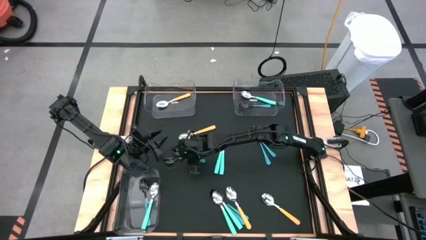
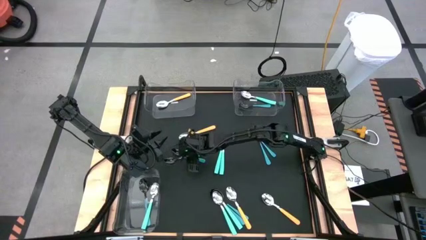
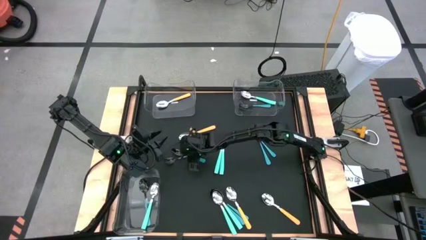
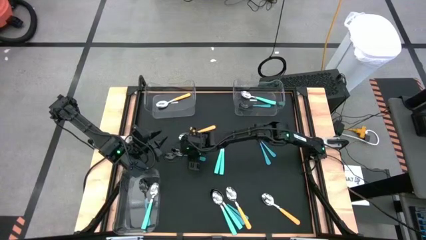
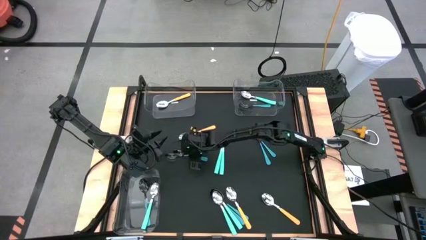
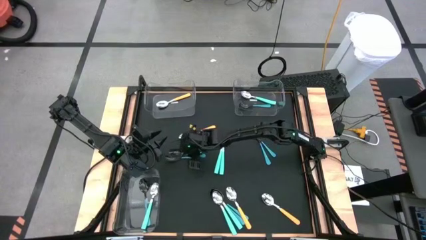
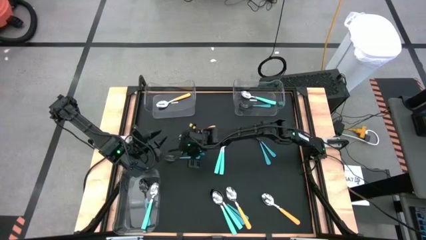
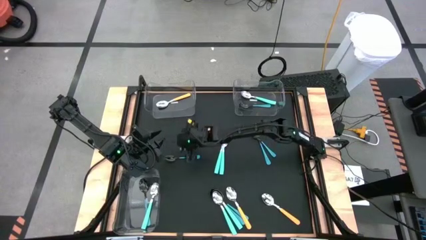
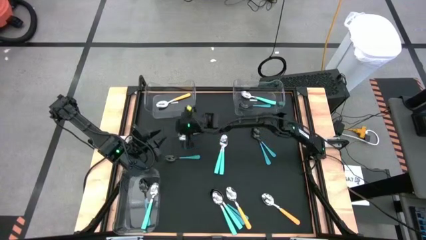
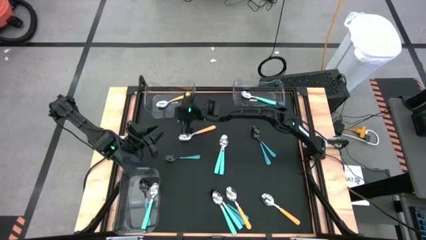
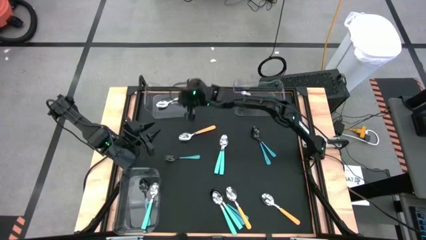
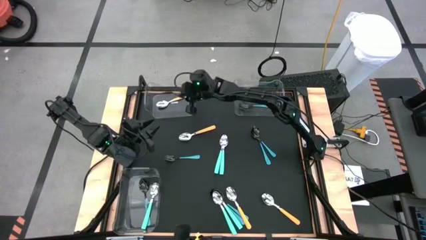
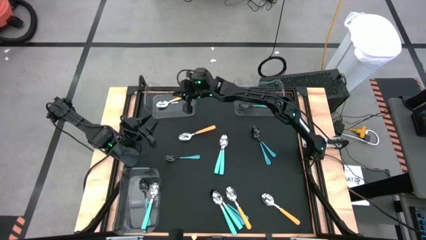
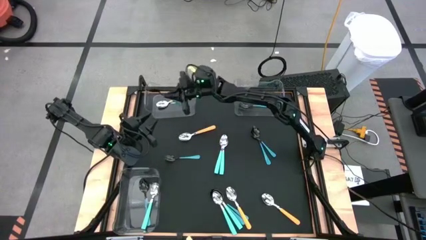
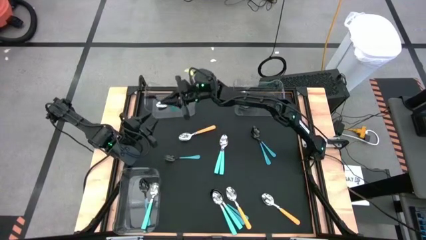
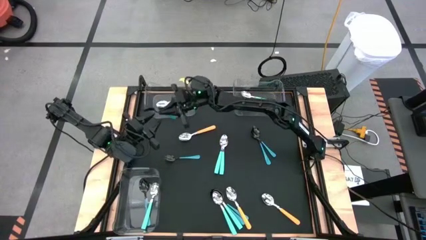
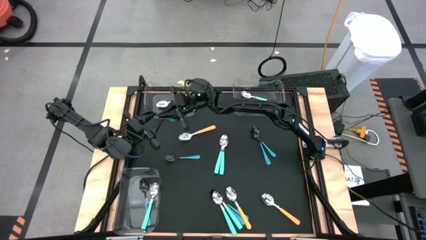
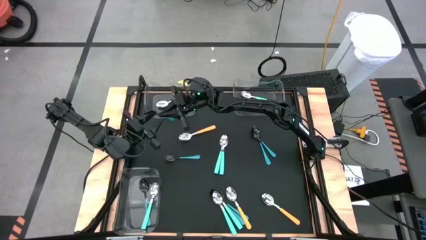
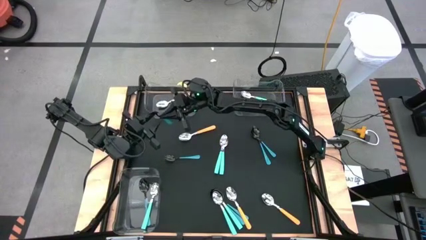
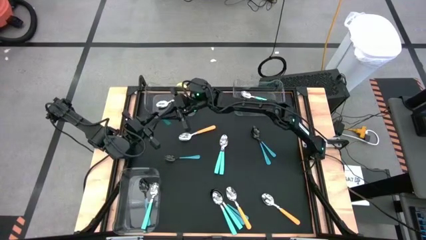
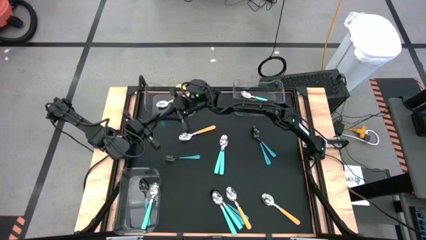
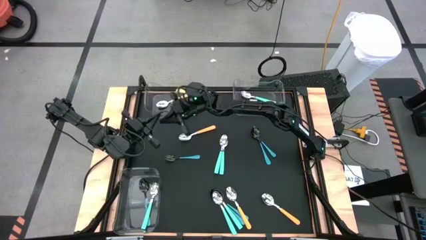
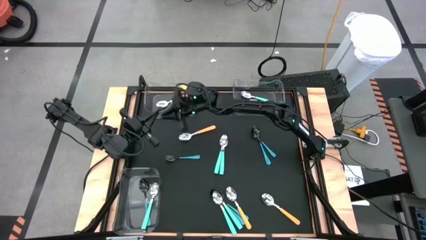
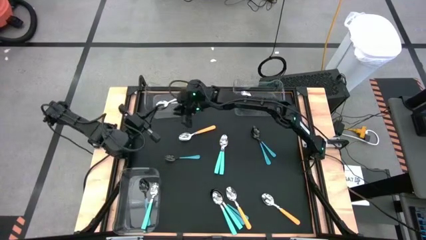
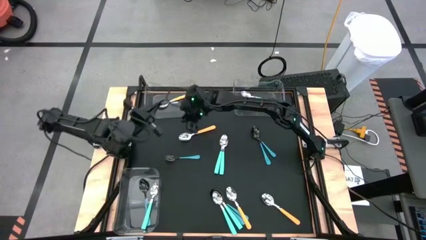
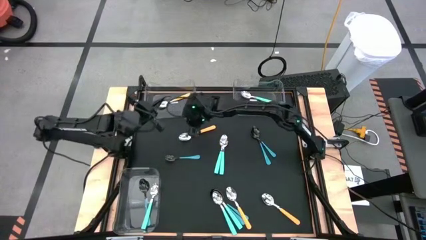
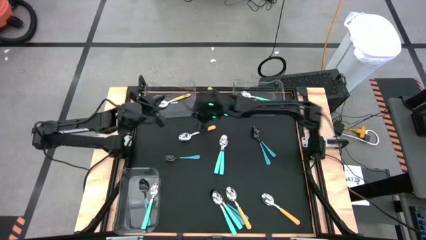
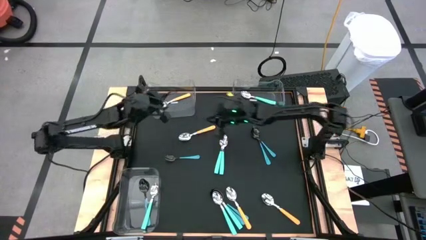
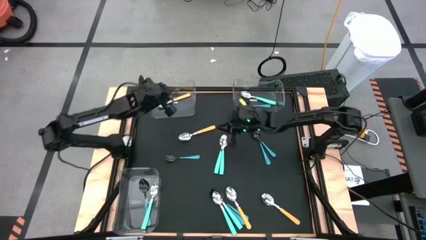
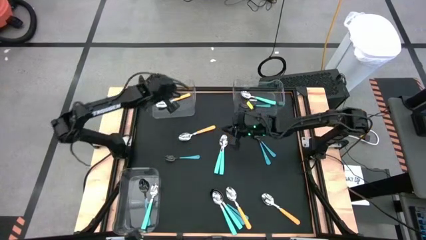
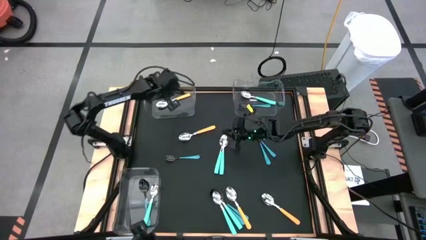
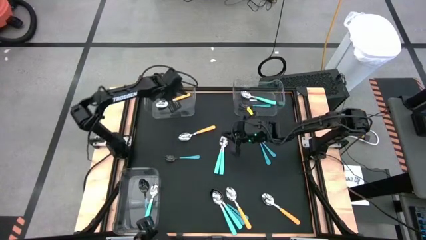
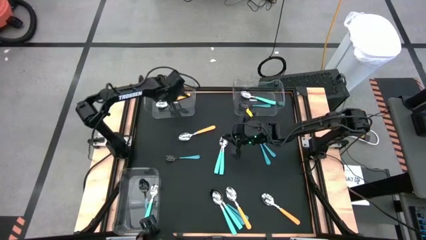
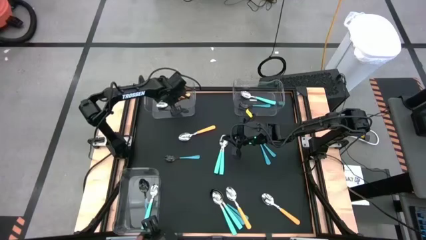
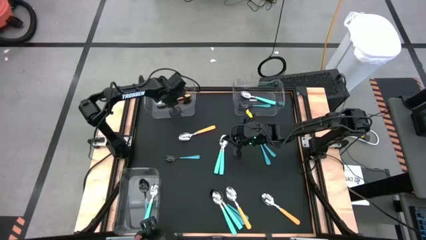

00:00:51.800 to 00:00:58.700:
Task: Sort silverware by color (type)
Put the blue spoon into the top left transparent bin

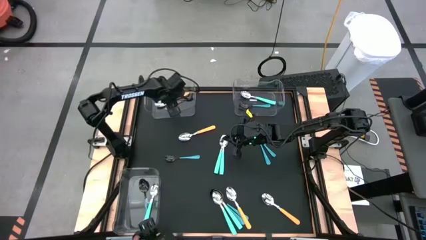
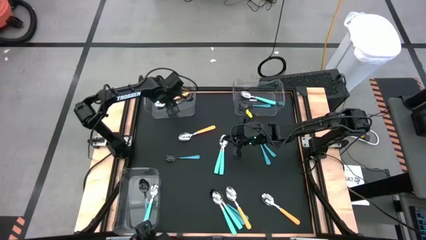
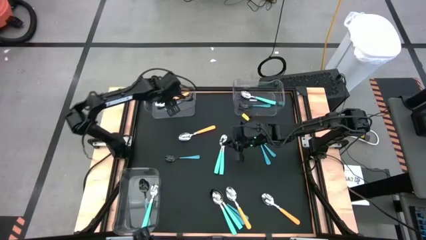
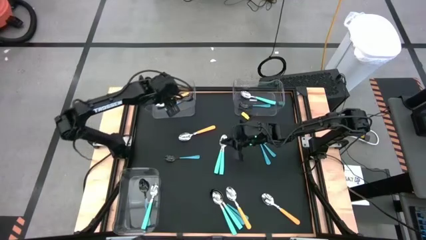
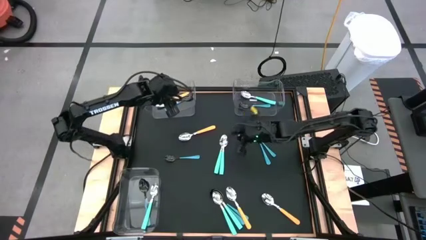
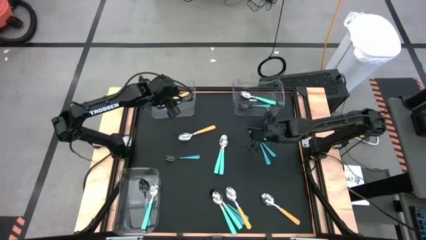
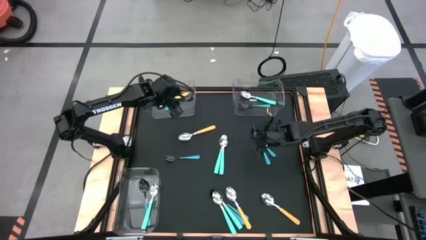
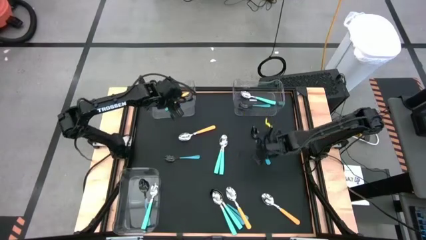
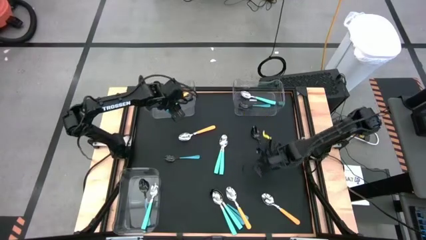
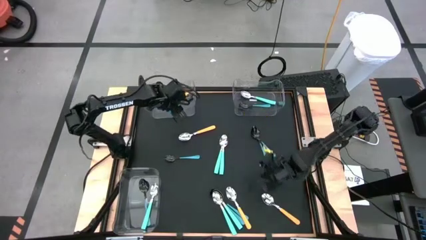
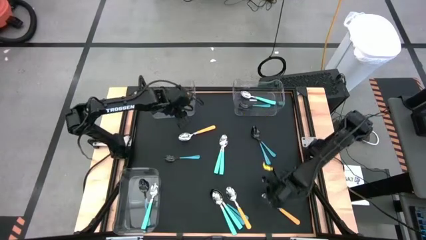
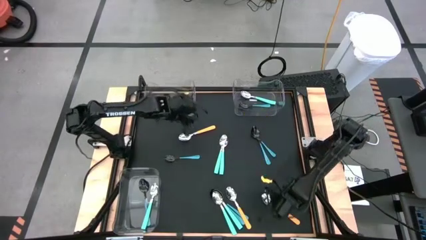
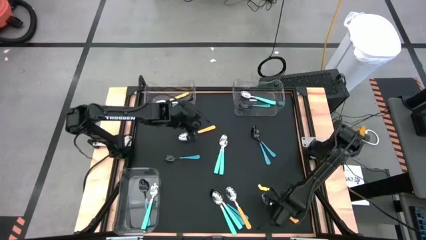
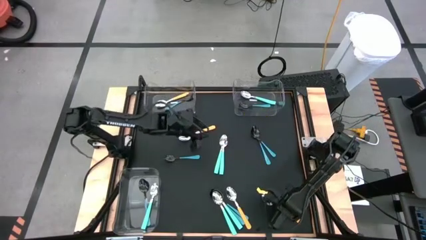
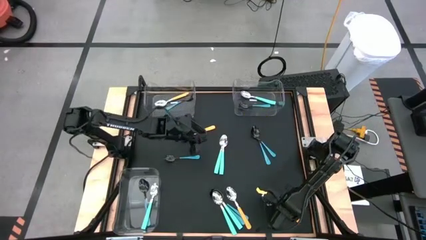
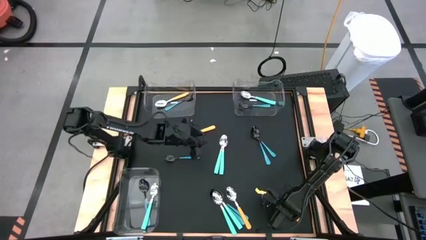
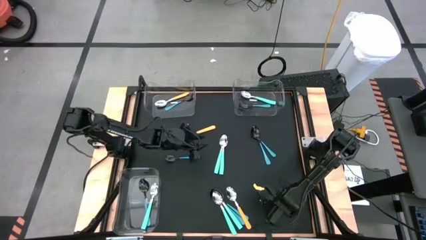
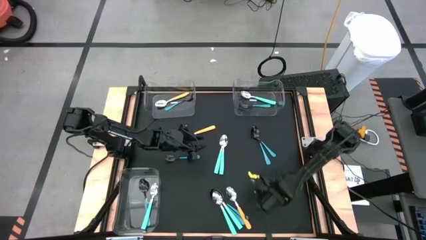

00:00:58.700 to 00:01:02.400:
Put the yellow spoon into the top right transparent bin

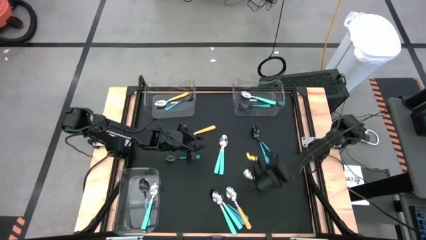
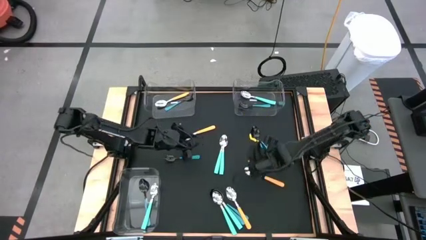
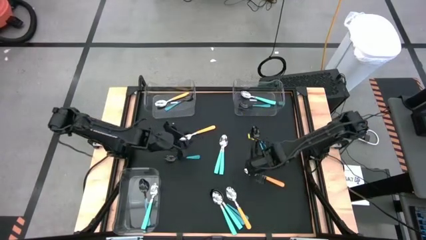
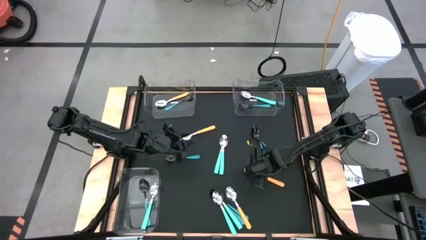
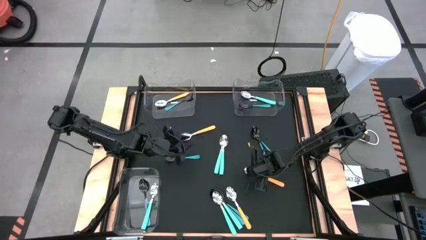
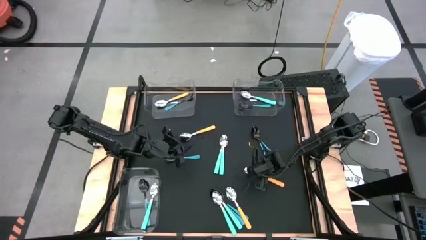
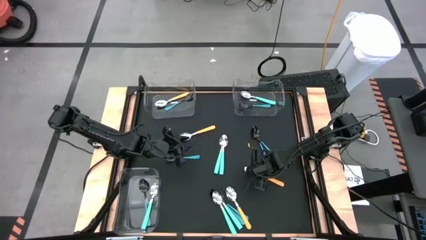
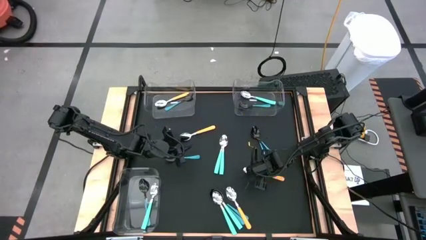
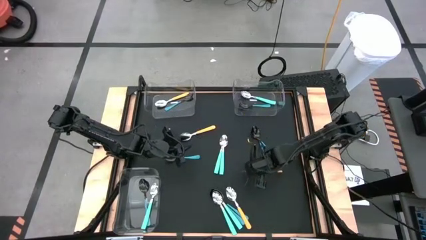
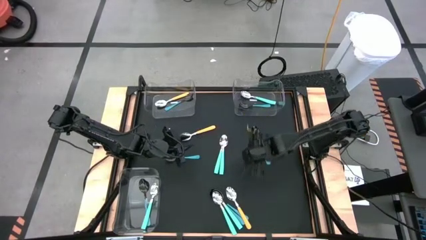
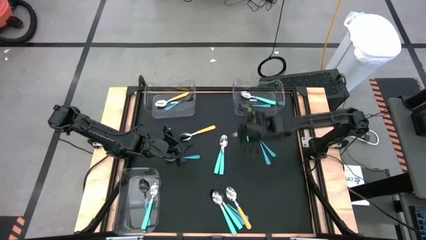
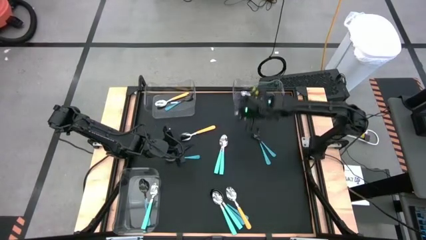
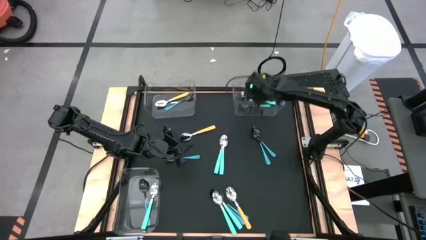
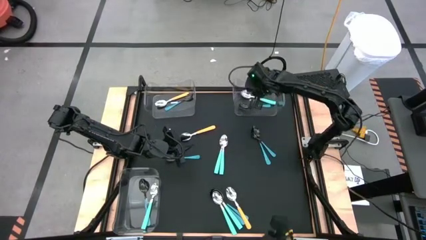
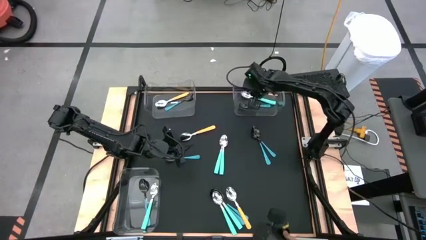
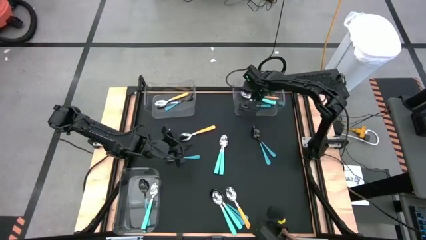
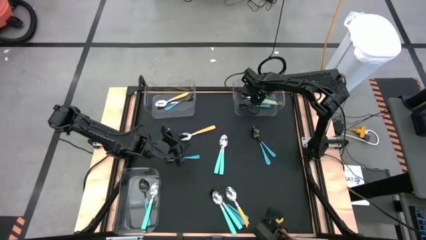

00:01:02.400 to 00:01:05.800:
Put the yellow spoon into the top right transparent bin

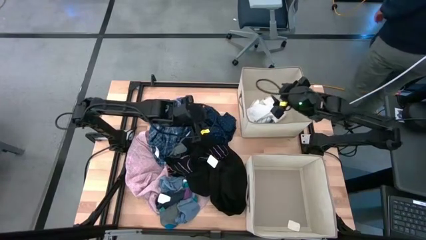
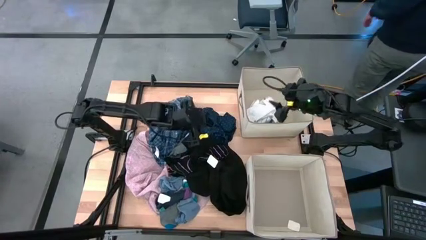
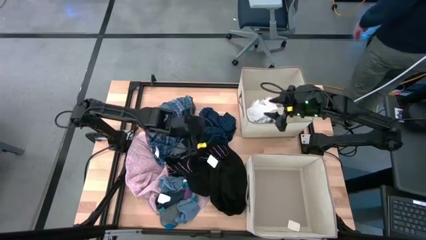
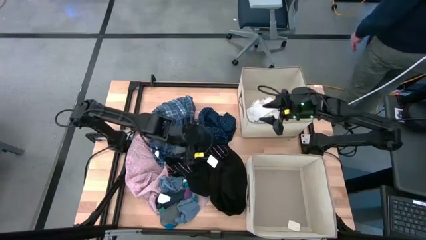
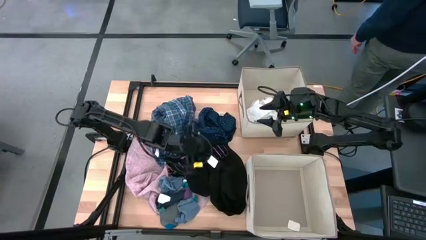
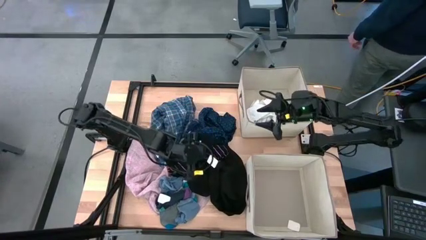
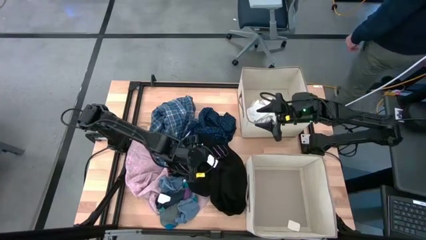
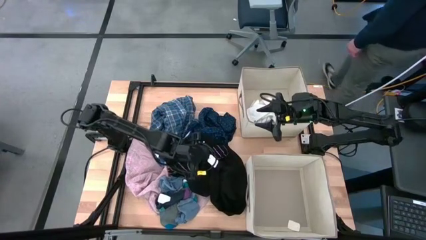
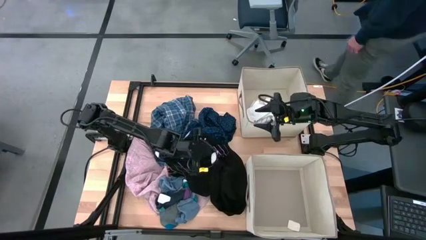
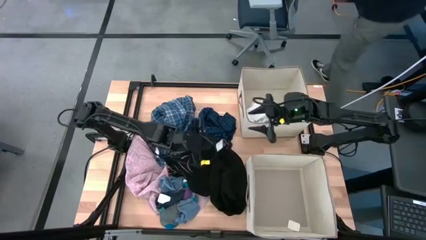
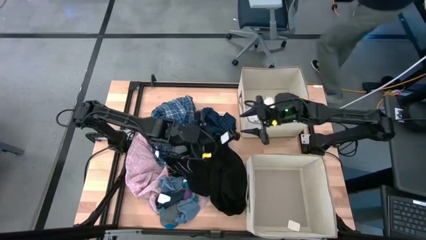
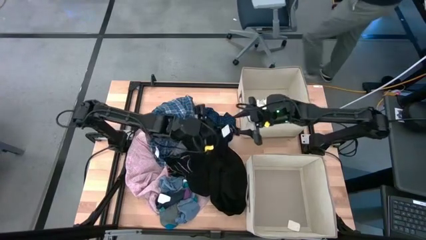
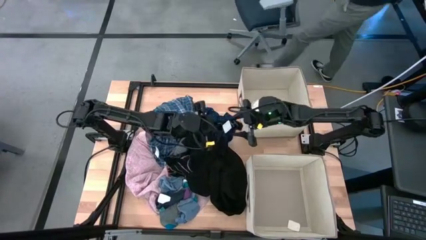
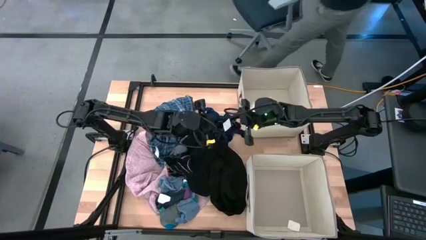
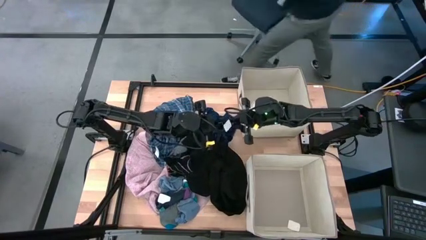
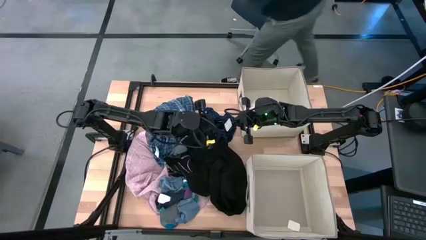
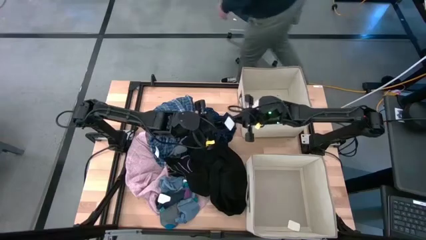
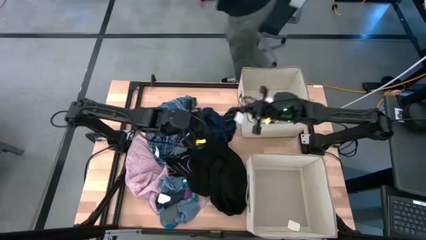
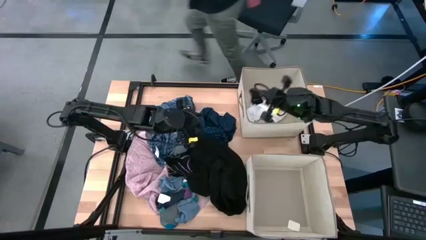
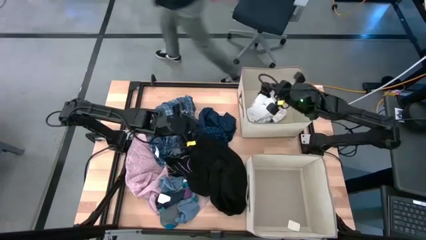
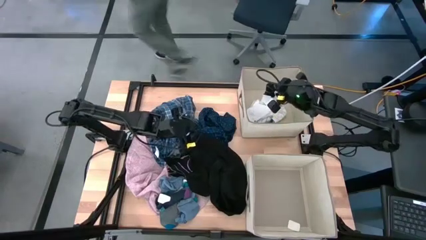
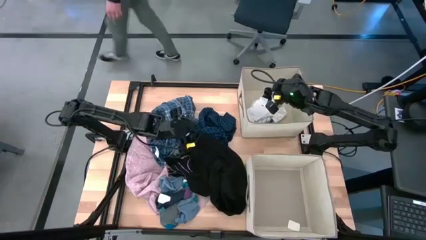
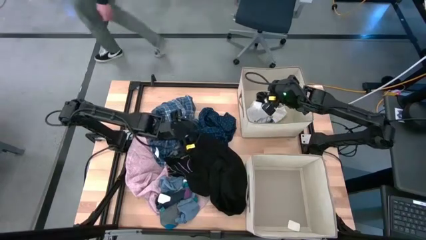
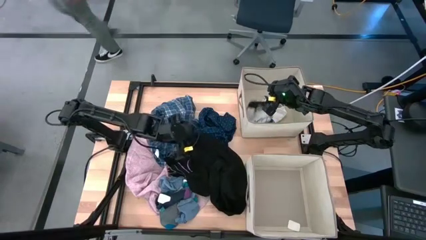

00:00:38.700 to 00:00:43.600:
Task: Sort clothes
Put the right striped black sock into the top laundry organizer
